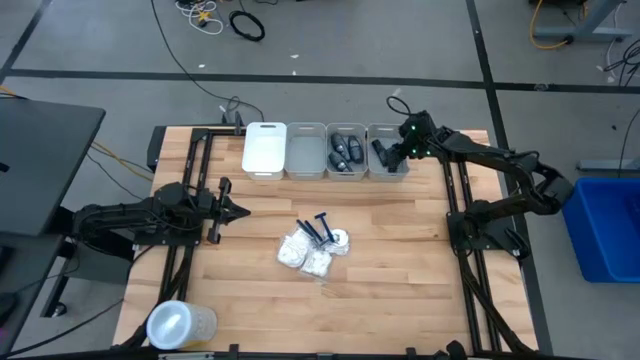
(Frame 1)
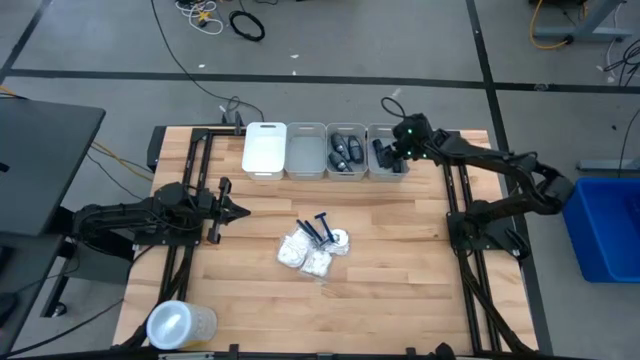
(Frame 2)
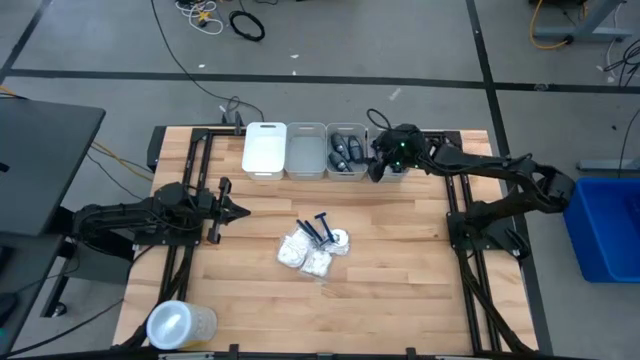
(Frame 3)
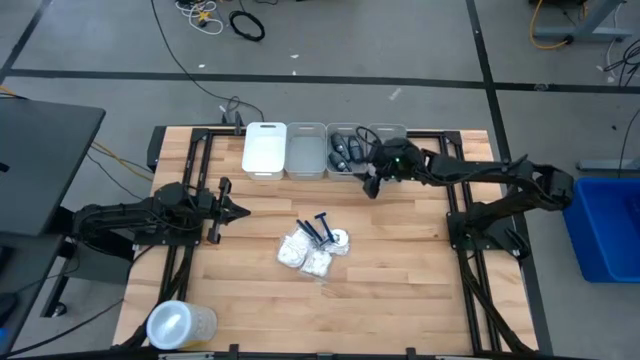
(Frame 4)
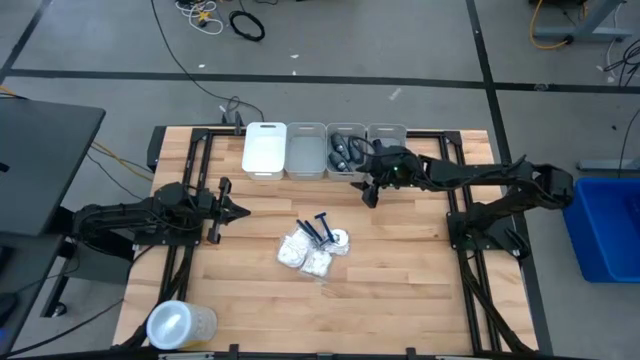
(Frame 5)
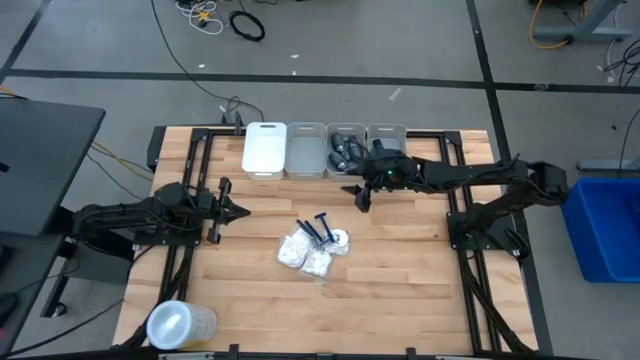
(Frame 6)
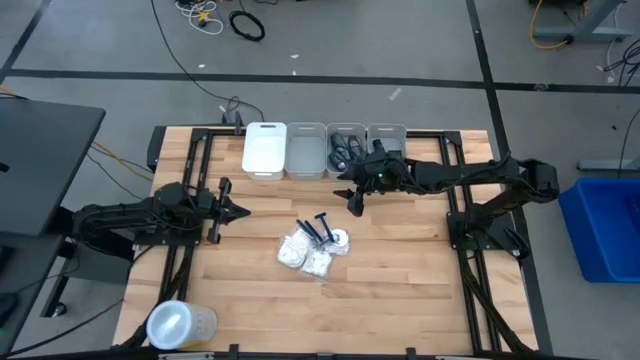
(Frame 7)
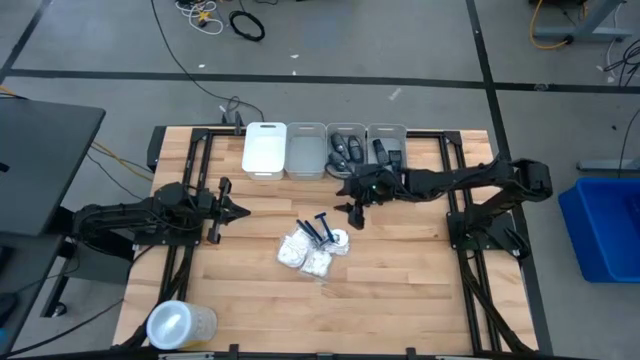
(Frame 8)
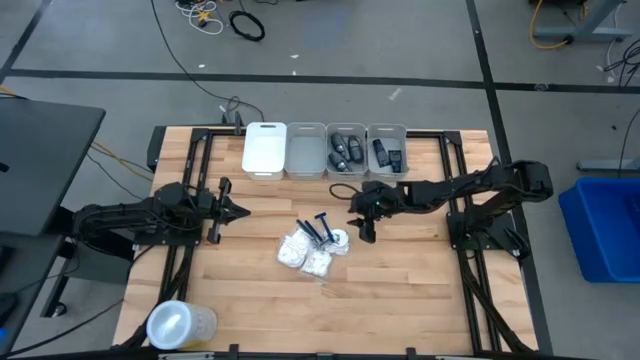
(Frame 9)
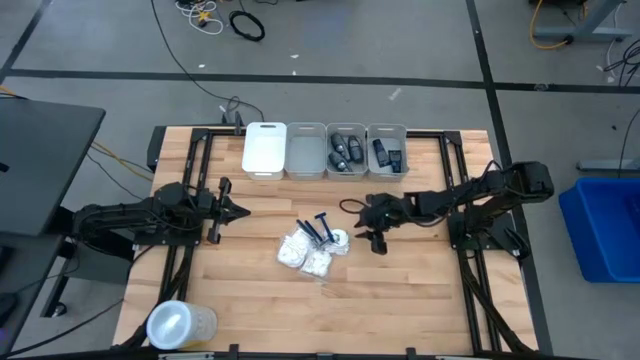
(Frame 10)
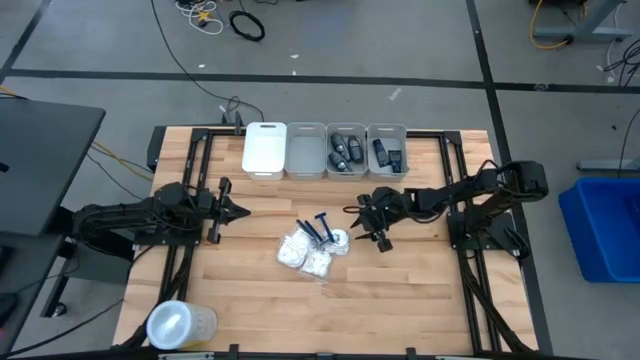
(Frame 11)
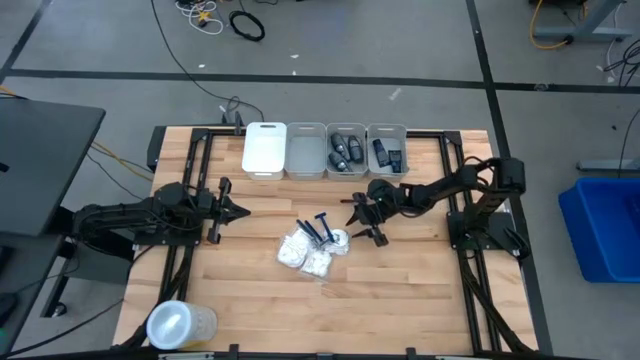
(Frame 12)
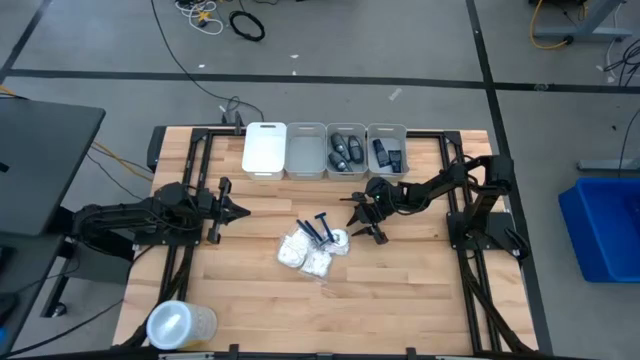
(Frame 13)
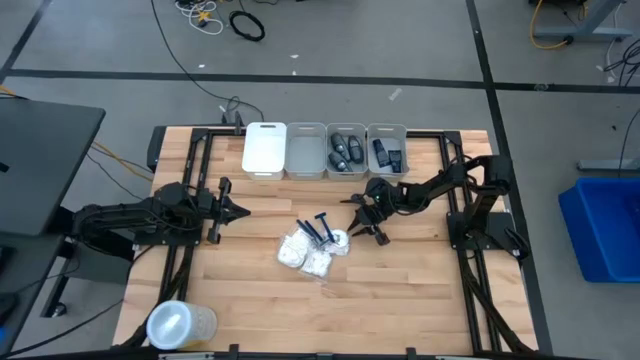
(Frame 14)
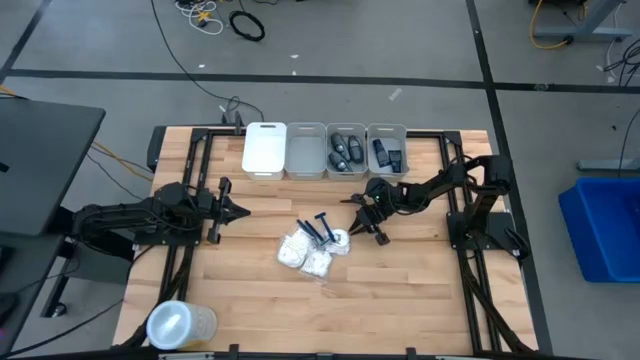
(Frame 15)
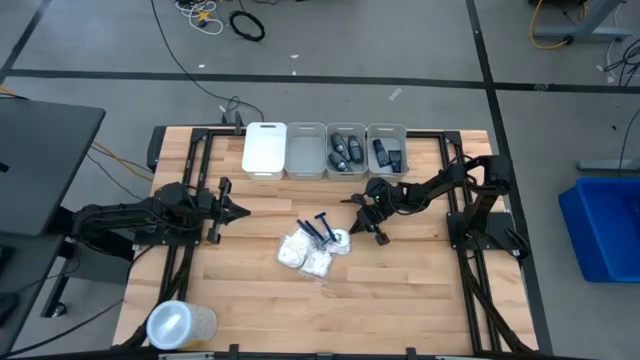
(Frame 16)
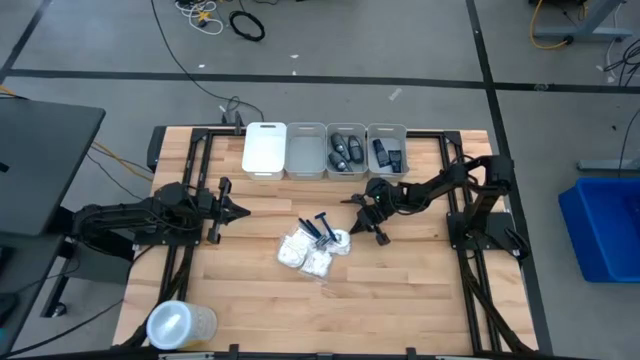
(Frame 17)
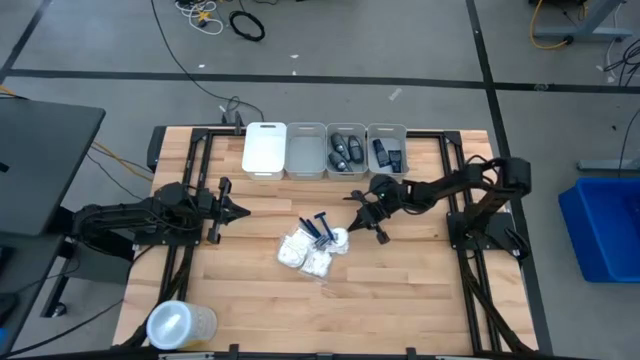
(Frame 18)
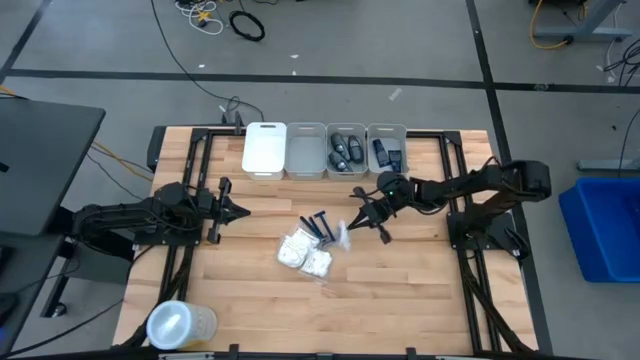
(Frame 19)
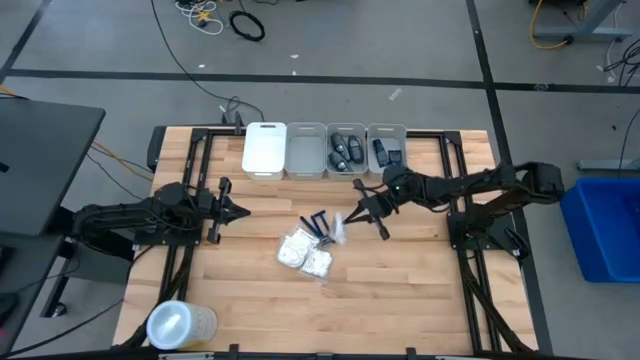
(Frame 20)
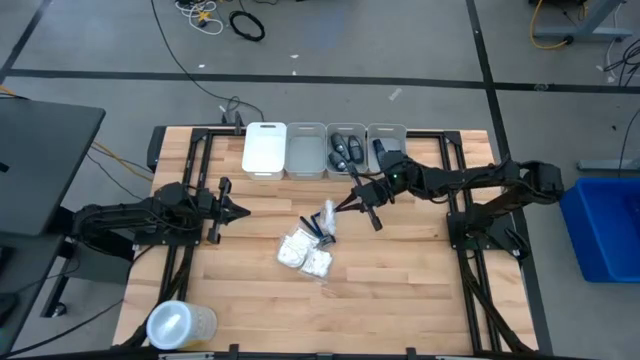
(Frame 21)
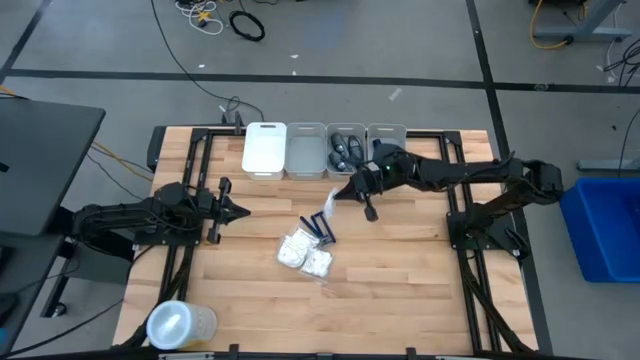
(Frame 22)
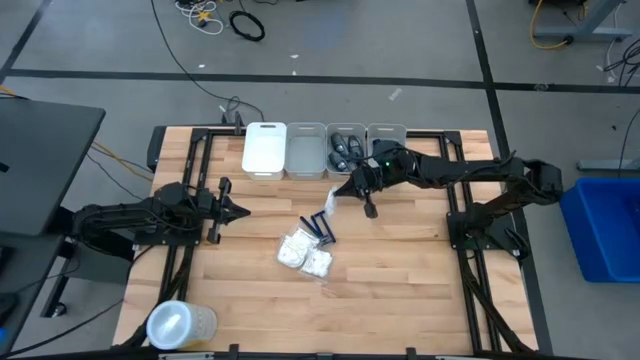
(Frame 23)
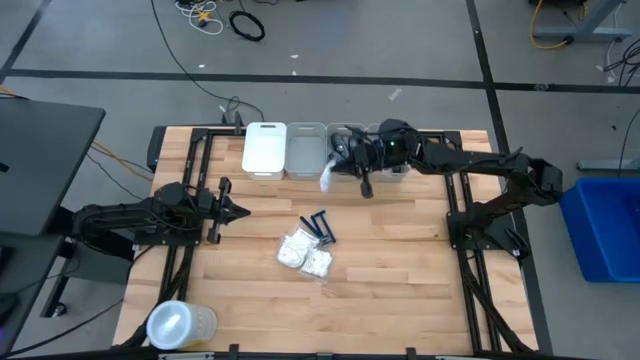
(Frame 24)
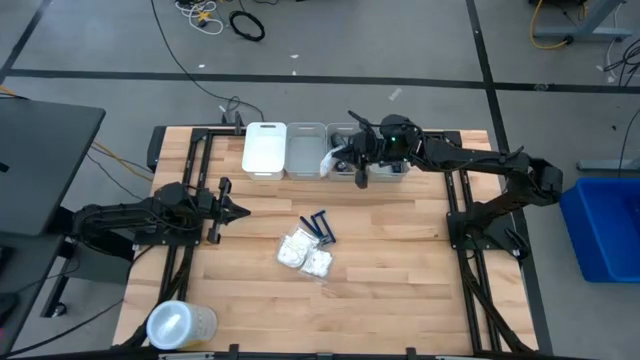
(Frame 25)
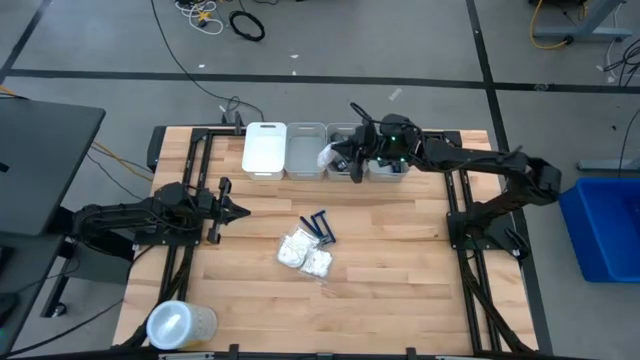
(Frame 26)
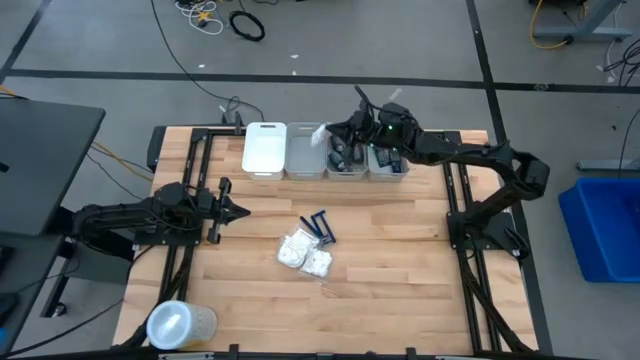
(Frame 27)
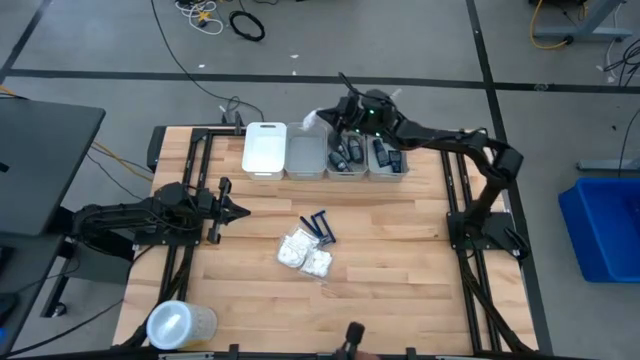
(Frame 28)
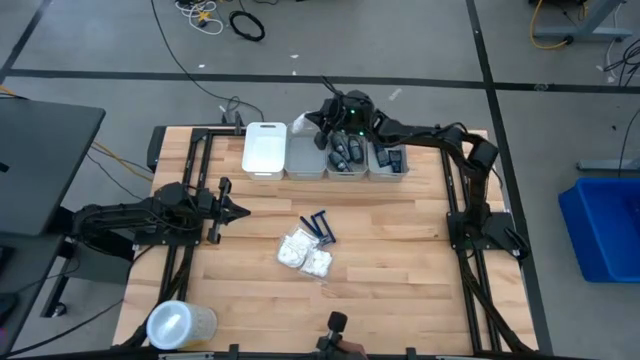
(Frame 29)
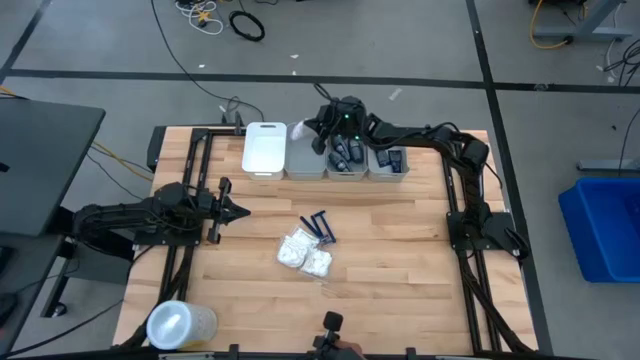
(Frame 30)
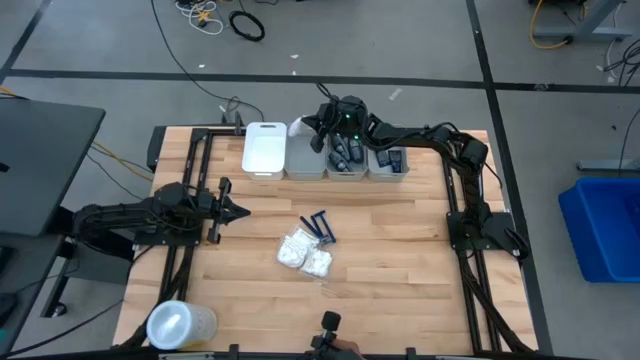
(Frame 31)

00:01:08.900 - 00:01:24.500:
Task: Pick & Place Travel size toiletries
Put the white cotton pack into the left gray bin

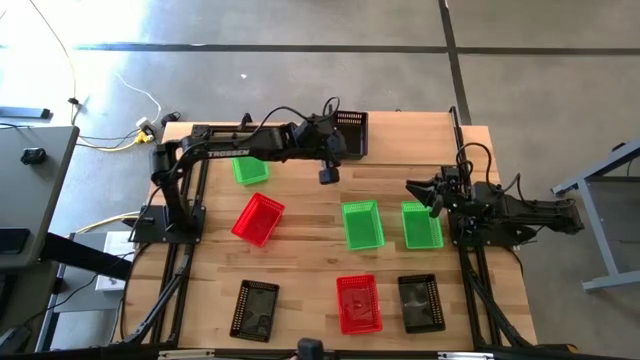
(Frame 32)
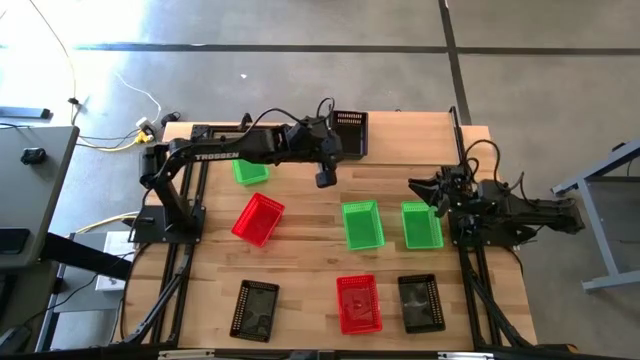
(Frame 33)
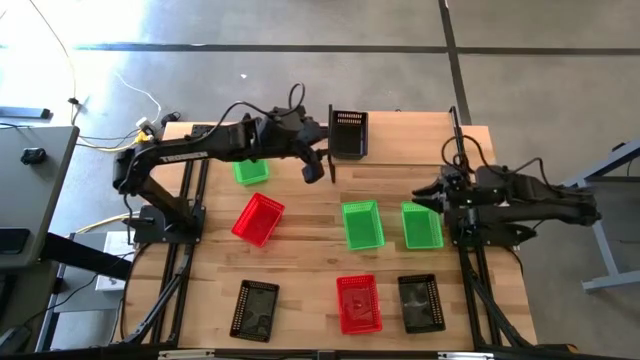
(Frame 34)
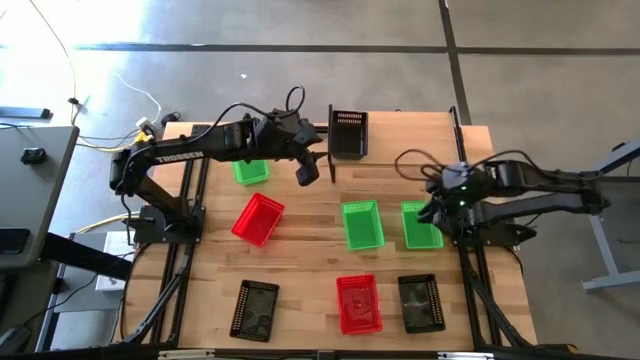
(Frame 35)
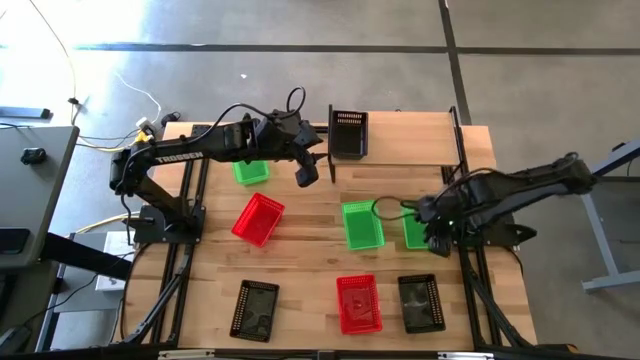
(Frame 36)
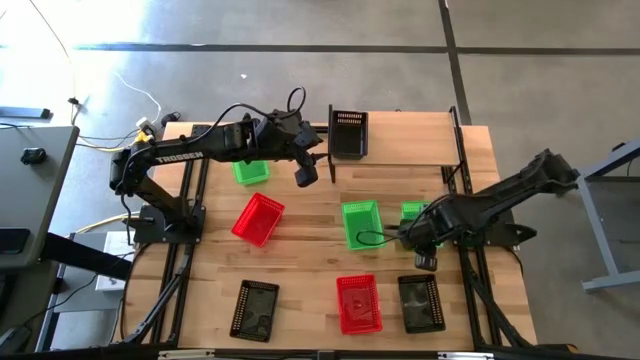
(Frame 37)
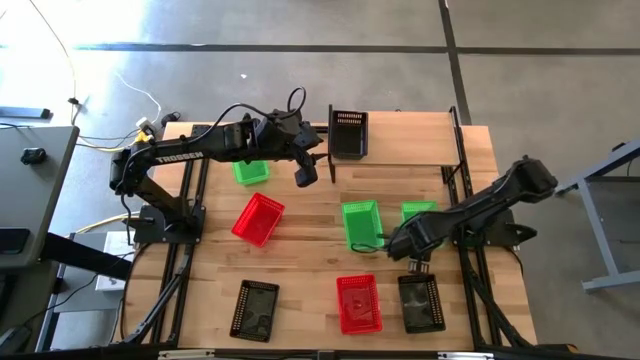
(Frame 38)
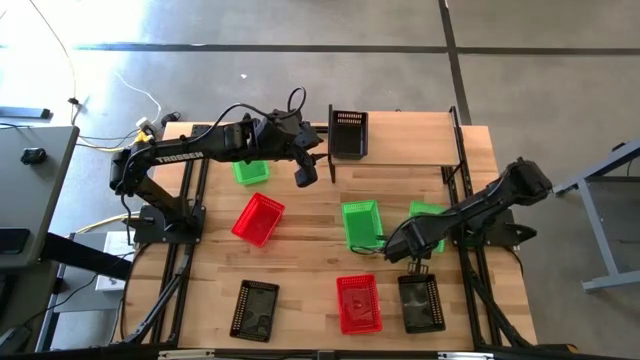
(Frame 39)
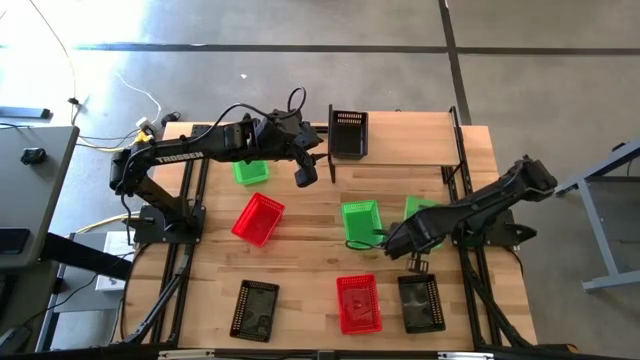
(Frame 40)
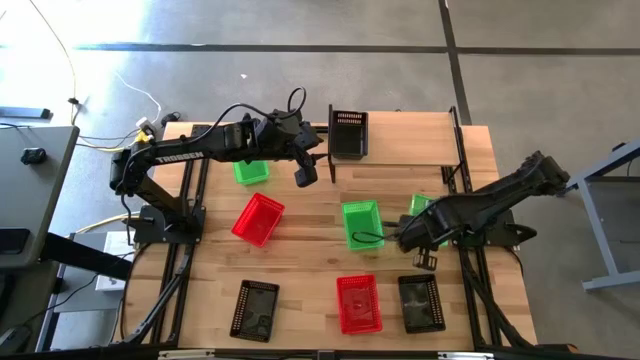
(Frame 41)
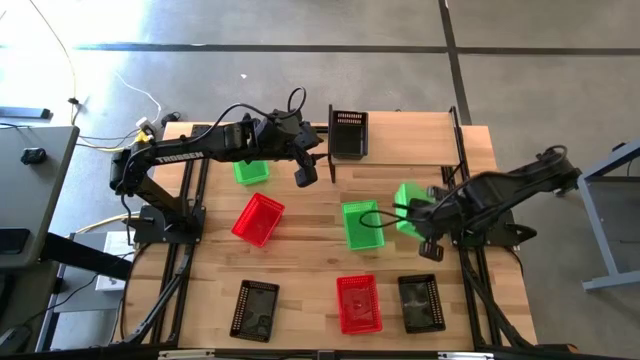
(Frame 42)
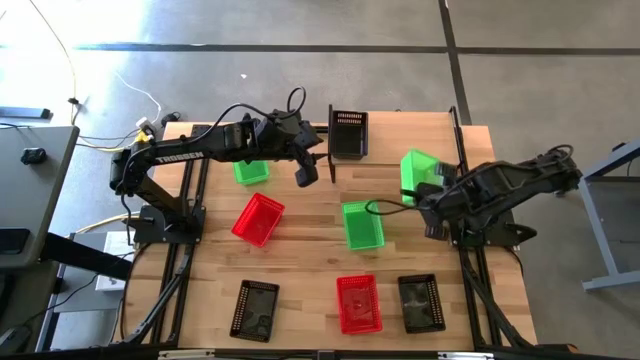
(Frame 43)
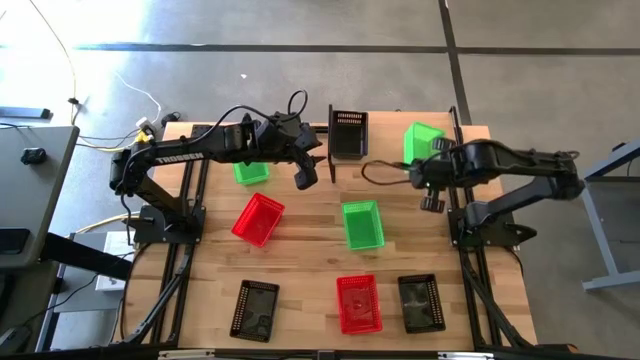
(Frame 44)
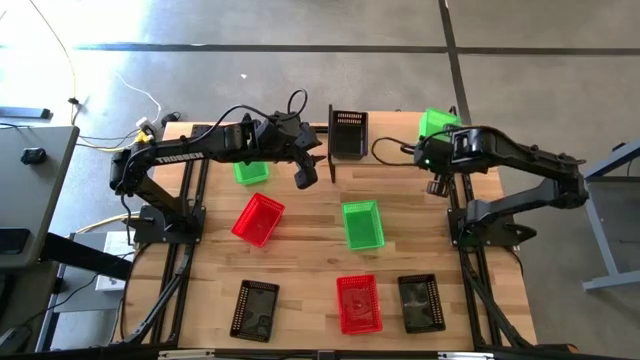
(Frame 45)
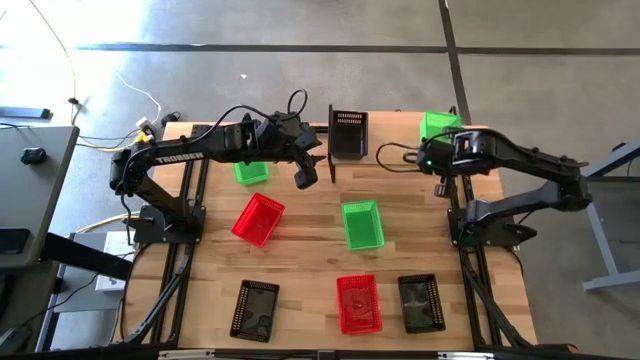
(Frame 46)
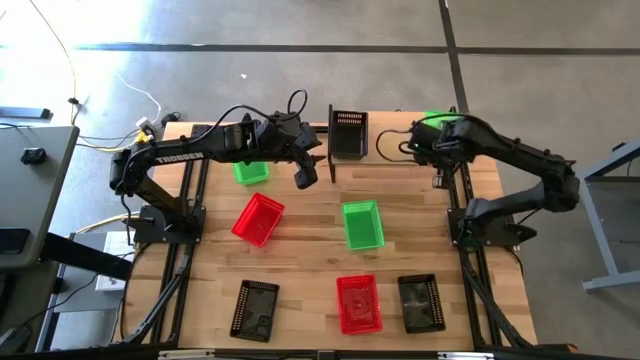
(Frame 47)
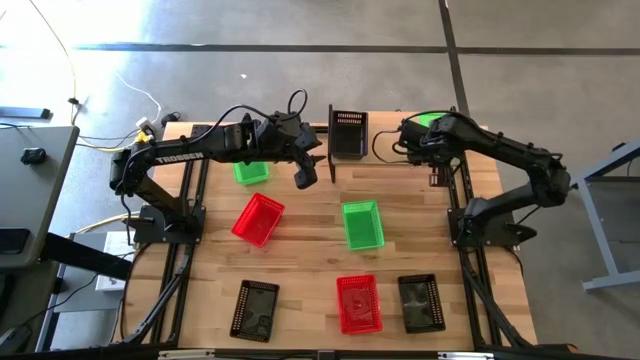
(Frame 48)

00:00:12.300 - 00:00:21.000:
Task: Stack baskets on shelf by color
Put the bottom right green bin on the shelf
